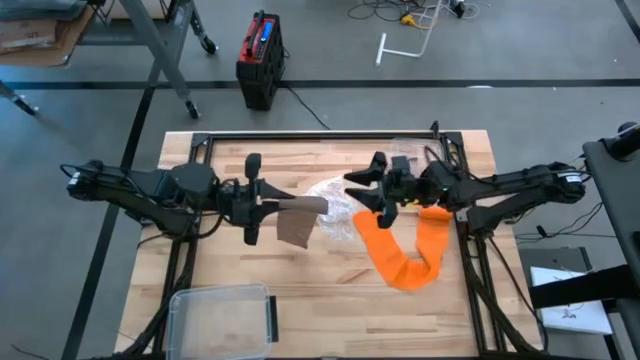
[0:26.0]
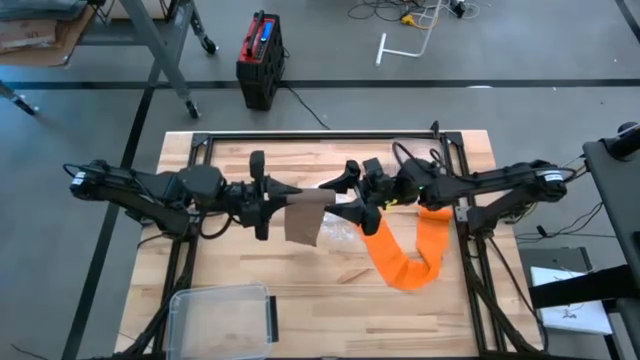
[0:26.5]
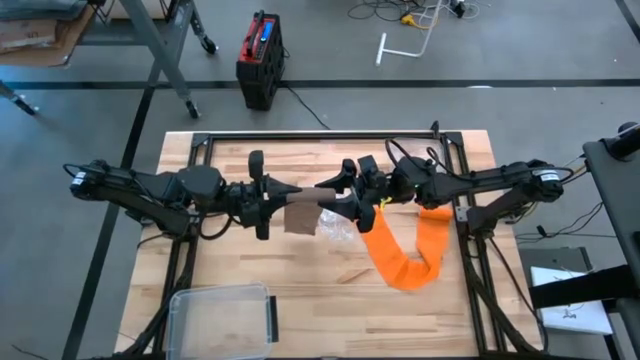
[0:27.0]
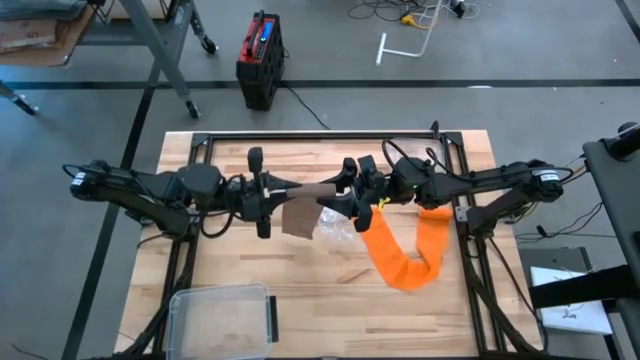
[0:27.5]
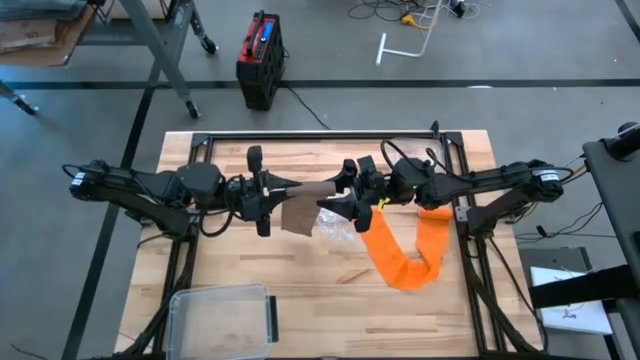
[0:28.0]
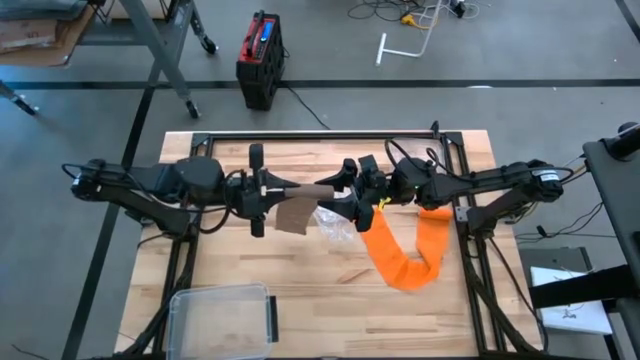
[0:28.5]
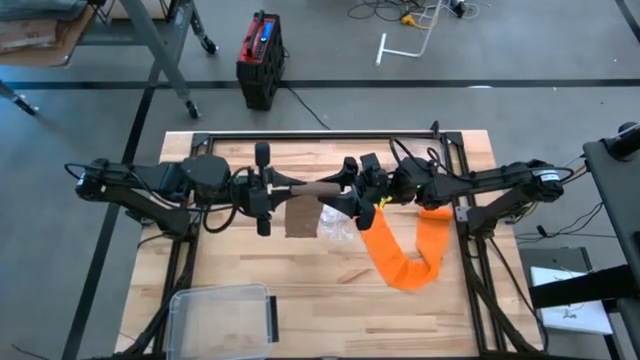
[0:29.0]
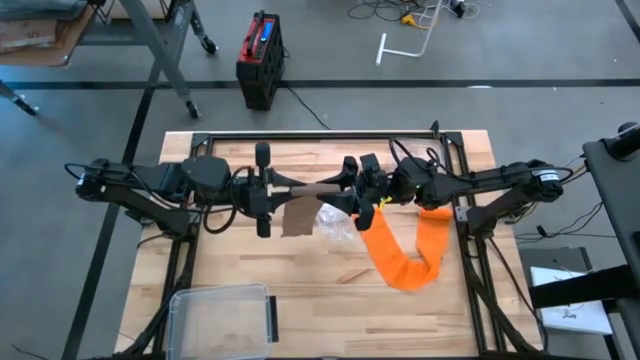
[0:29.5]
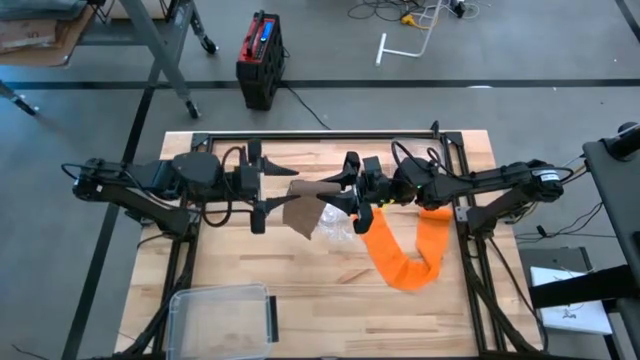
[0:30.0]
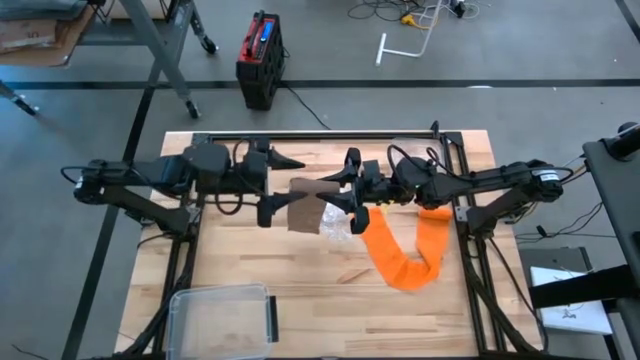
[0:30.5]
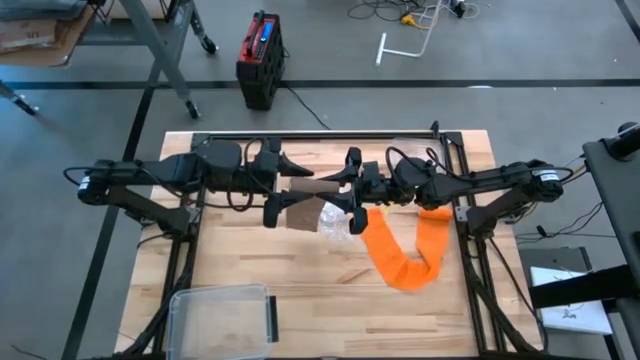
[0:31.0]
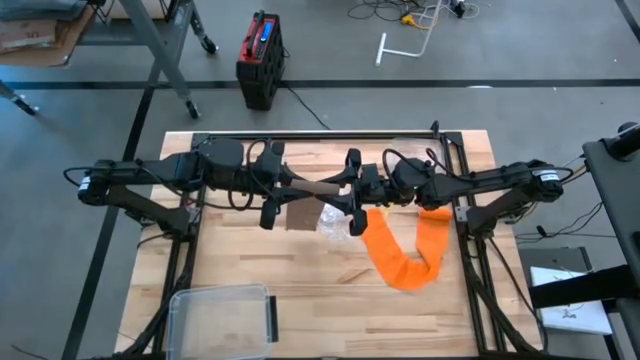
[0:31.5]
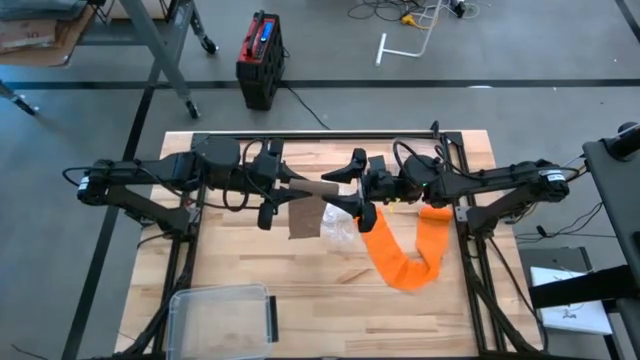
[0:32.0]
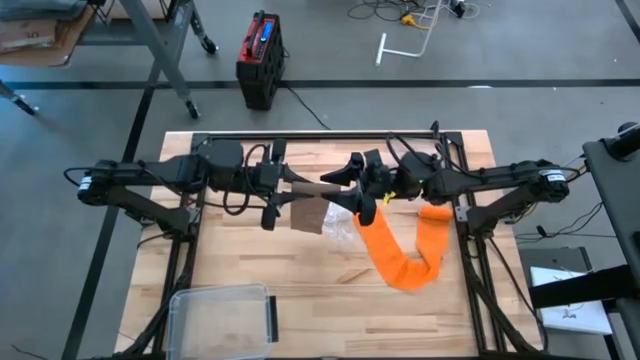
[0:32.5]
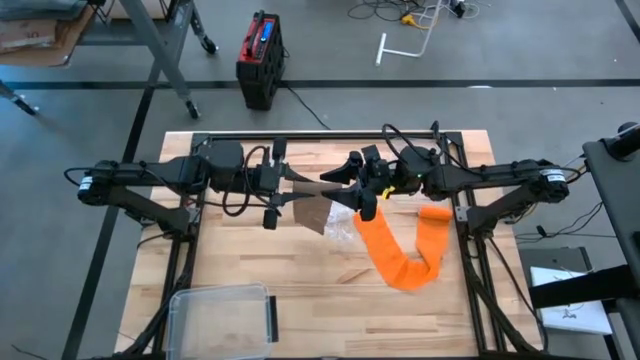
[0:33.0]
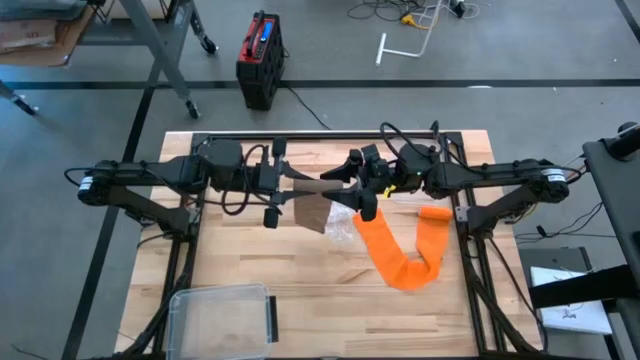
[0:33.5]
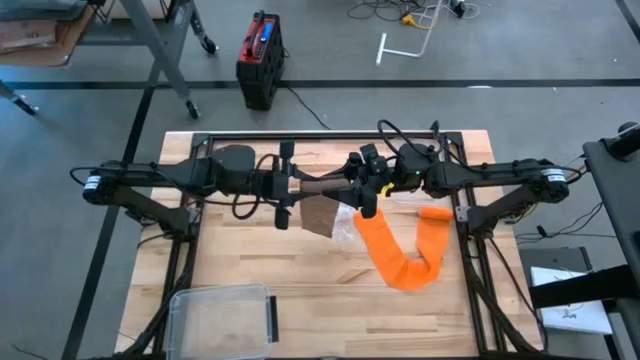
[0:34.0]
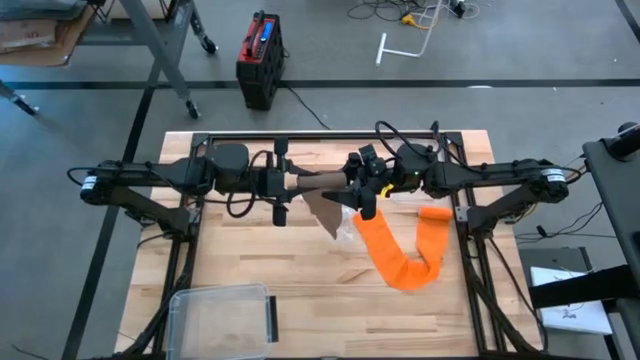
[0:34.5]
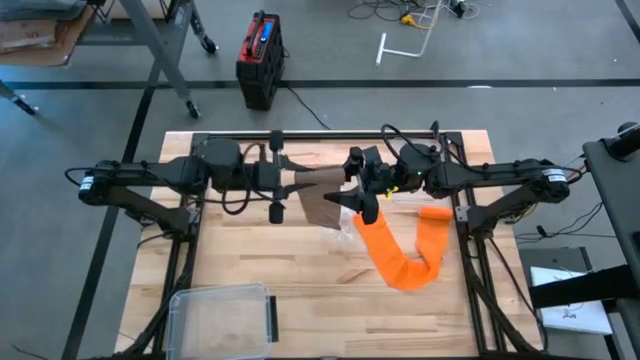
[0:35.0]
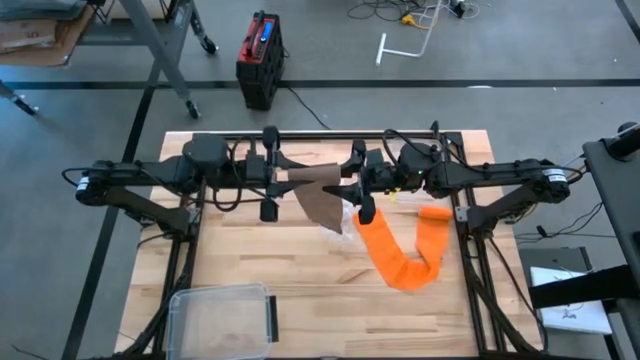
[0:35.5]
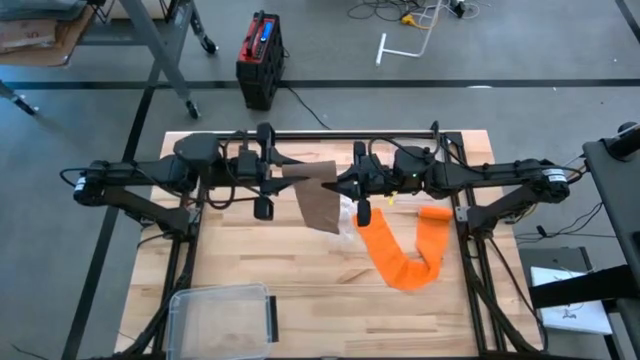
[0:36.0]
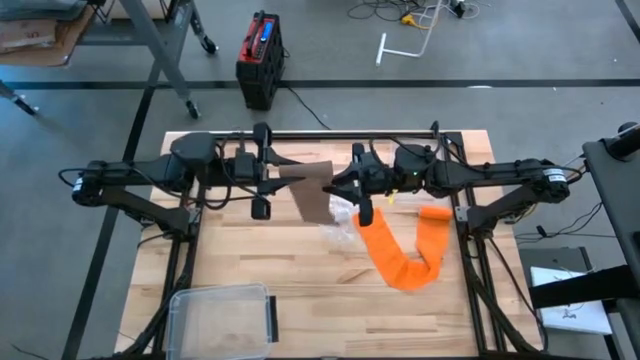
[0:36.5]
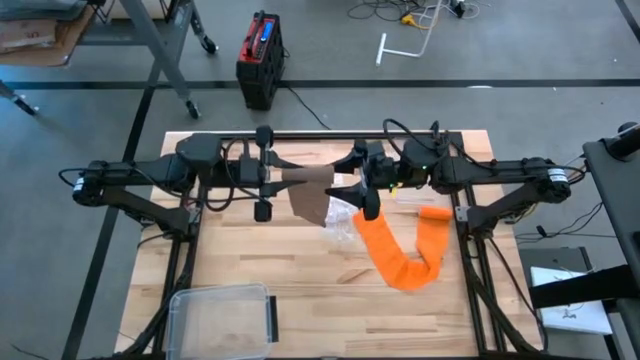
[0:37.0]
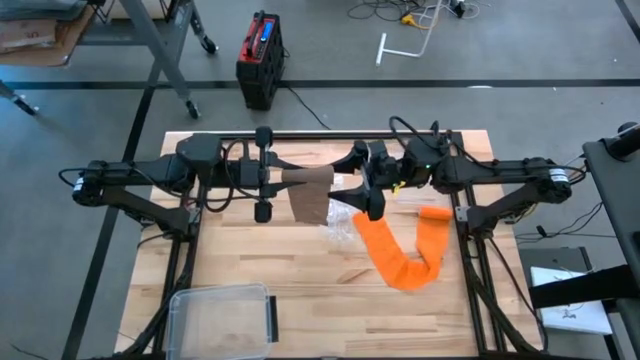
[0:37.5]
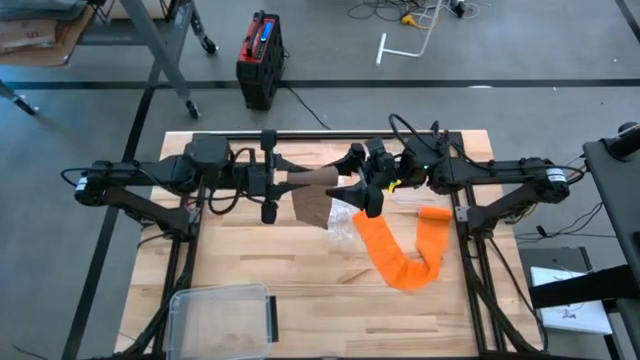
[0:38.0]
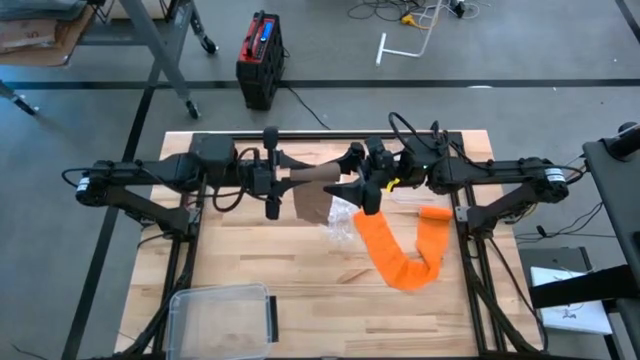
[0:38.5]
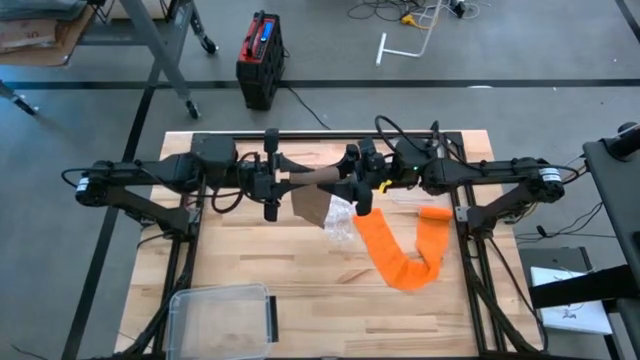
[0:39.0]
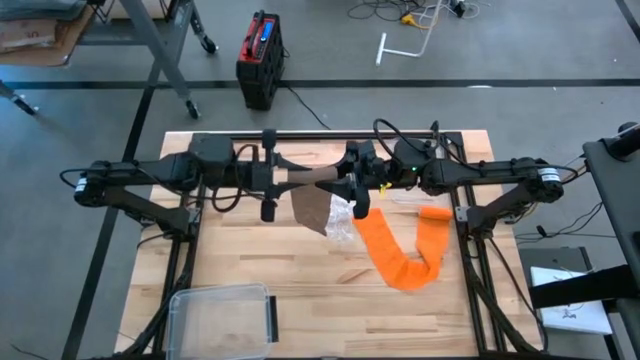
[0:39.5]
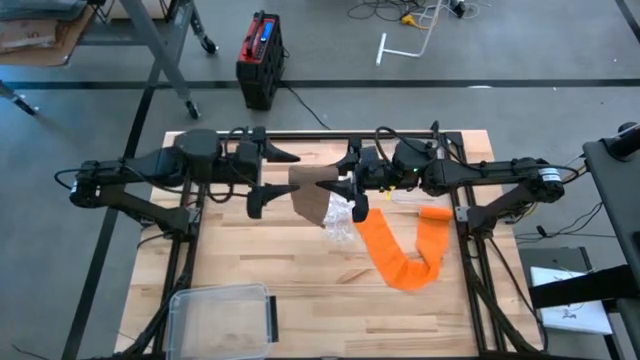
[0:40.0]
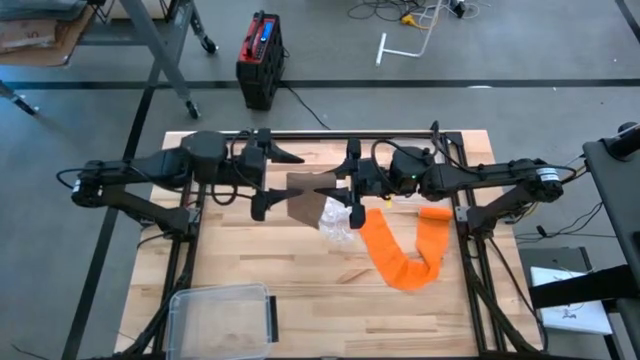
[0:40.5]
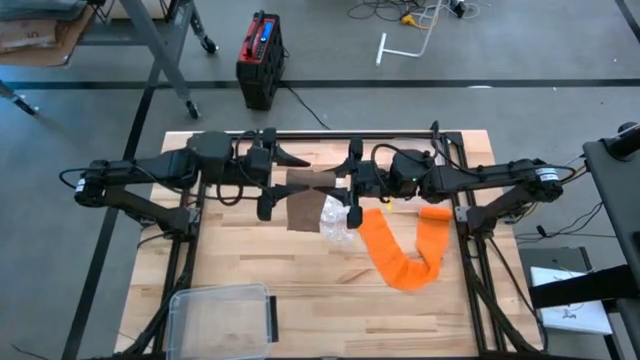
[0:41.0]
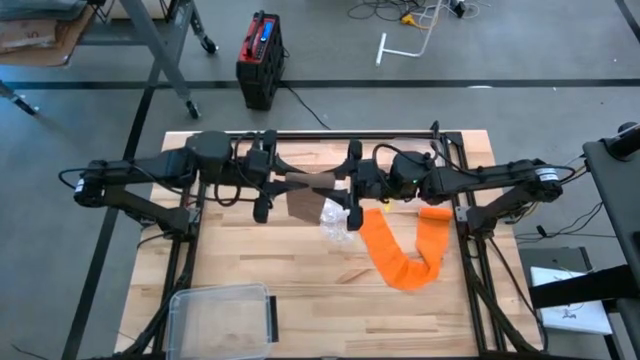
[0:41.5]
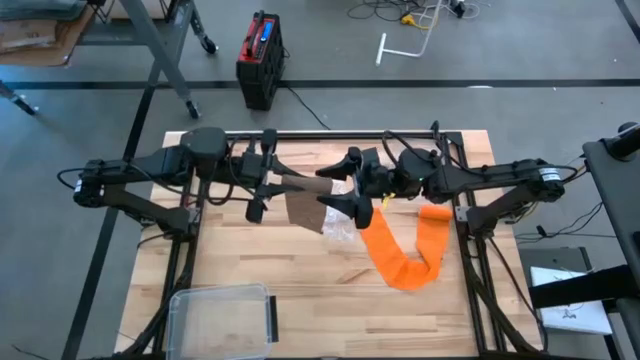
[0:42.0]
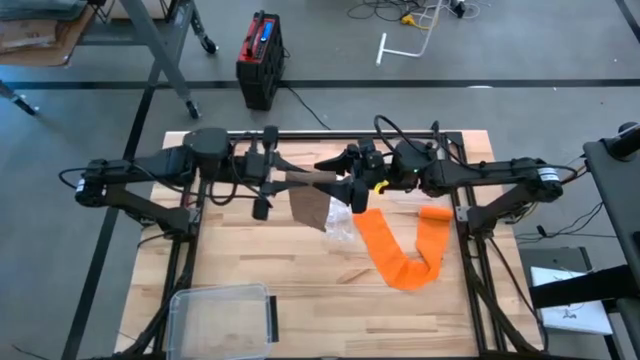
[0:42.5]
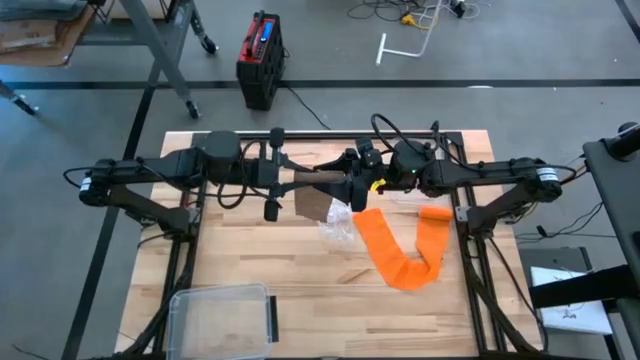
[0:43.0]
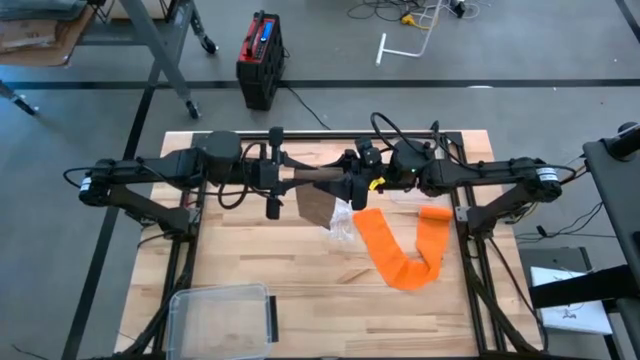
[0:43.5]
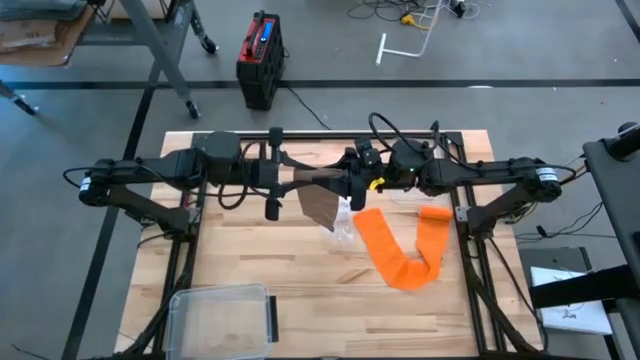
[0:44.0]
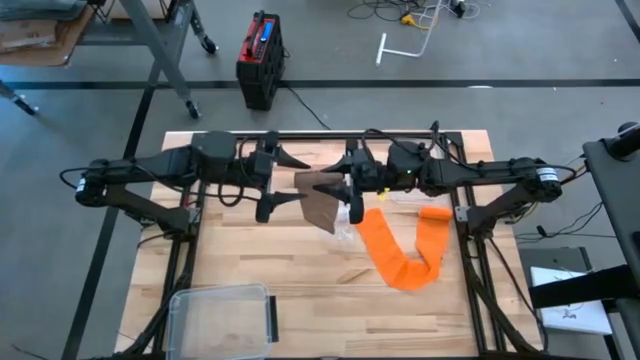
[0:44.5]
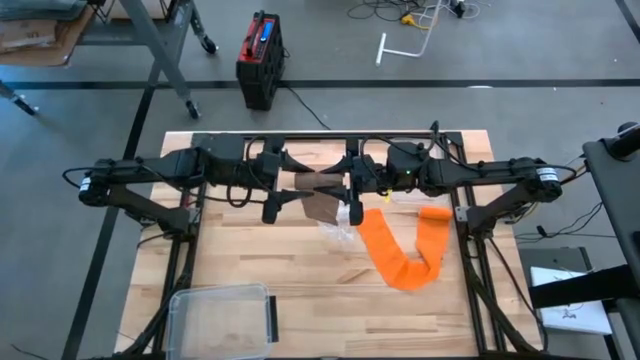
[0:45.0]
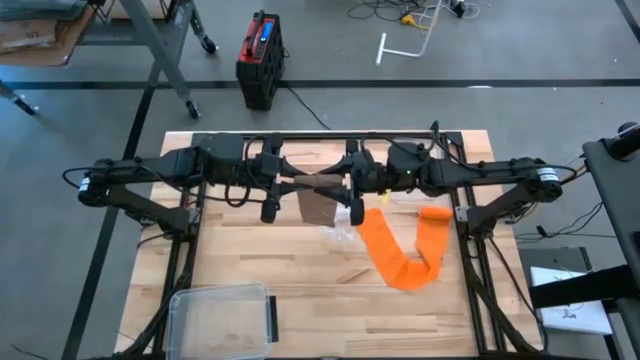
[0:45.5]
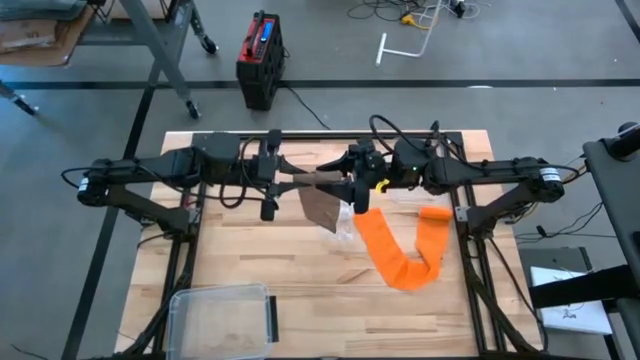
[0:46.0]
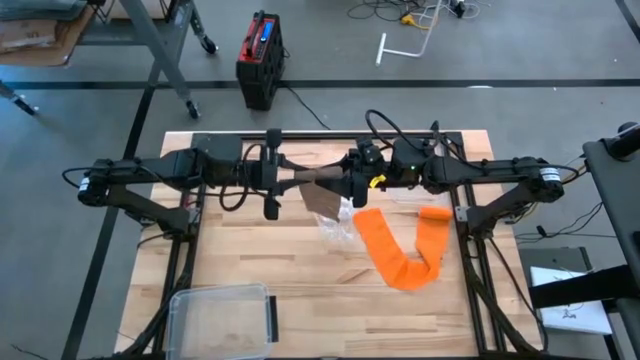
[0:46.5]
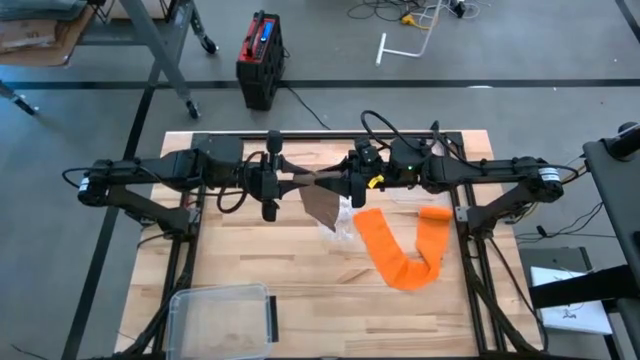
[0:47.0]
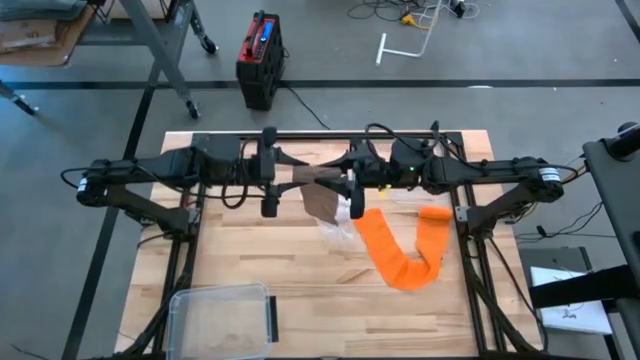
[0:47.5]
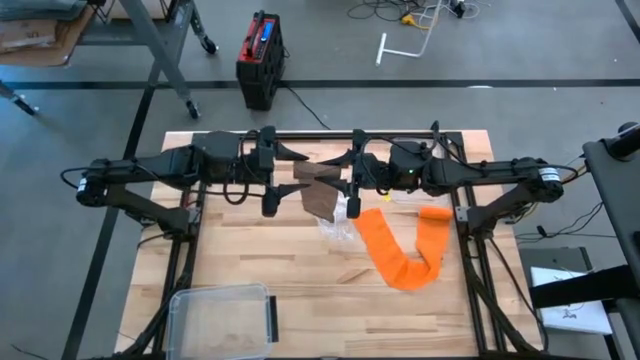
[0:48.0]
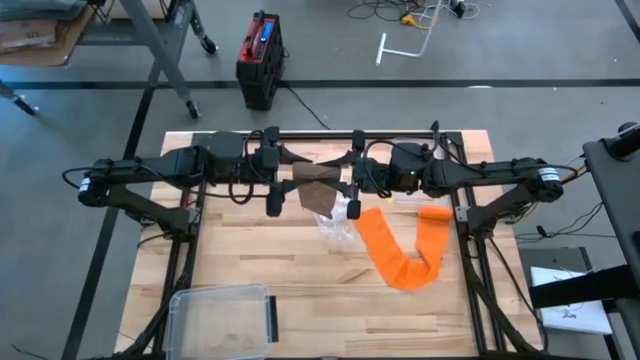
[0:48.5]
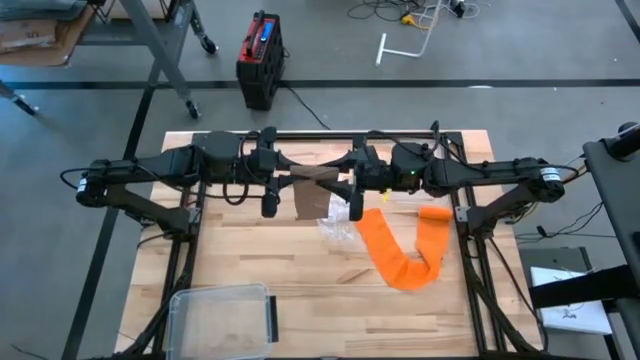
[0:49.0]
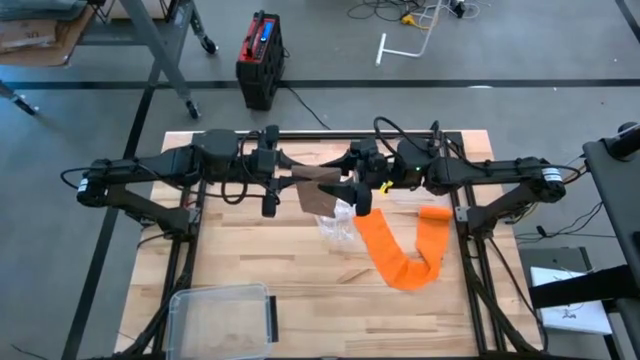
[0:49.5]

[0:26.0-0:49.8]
Task: Roll bandage
Roll the brown bandage
